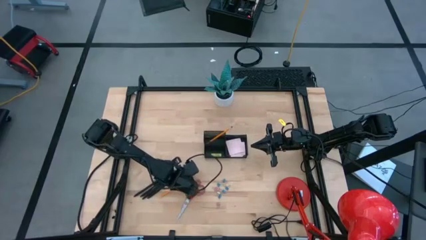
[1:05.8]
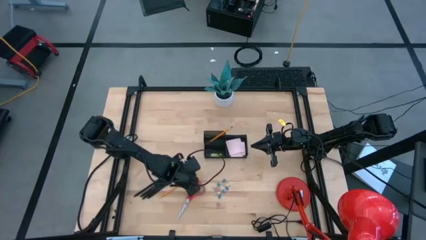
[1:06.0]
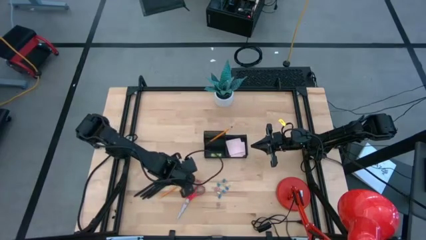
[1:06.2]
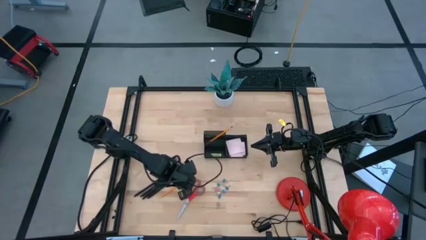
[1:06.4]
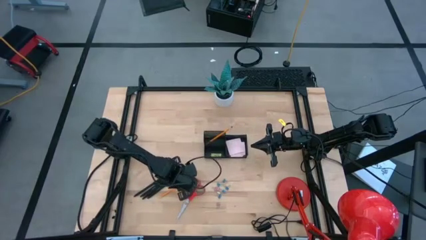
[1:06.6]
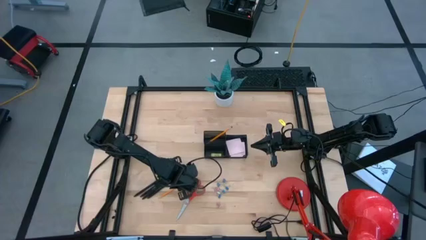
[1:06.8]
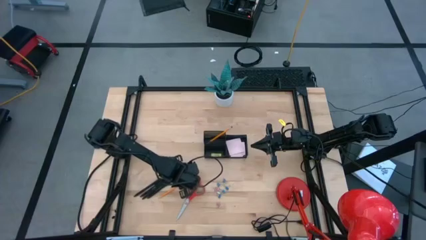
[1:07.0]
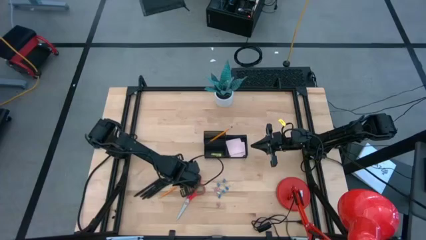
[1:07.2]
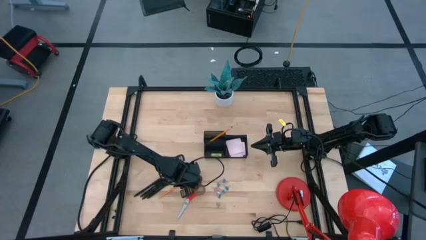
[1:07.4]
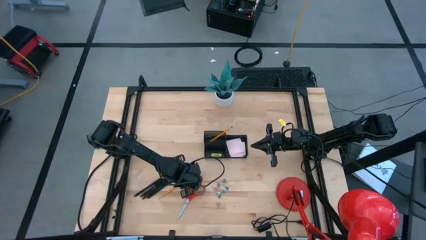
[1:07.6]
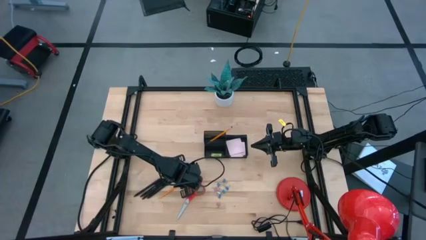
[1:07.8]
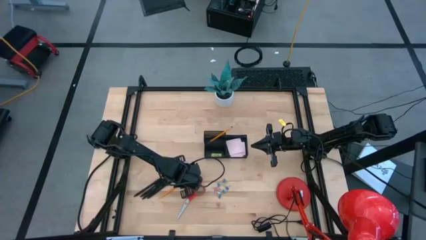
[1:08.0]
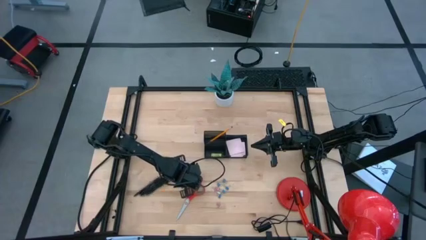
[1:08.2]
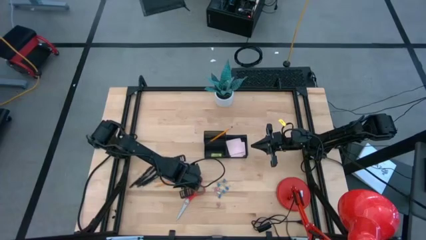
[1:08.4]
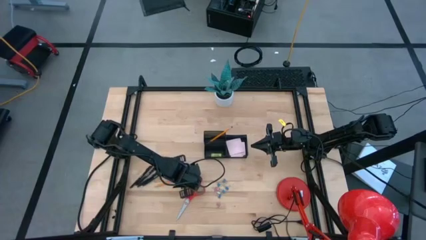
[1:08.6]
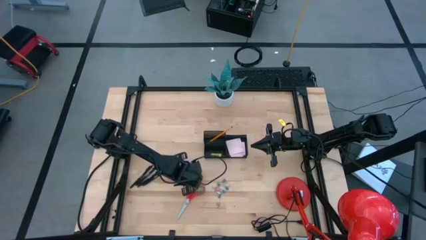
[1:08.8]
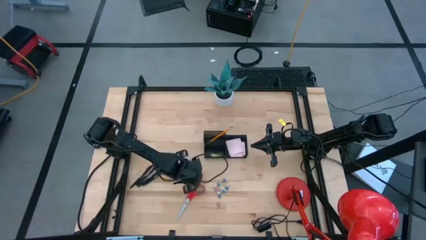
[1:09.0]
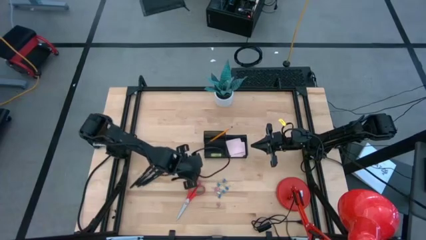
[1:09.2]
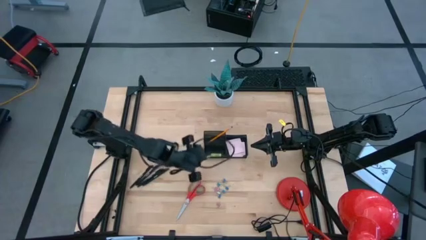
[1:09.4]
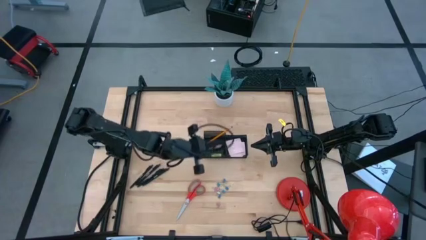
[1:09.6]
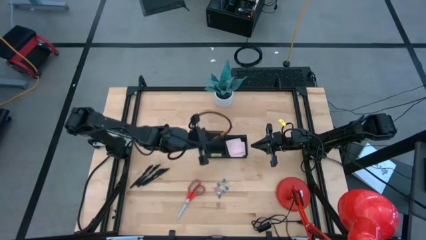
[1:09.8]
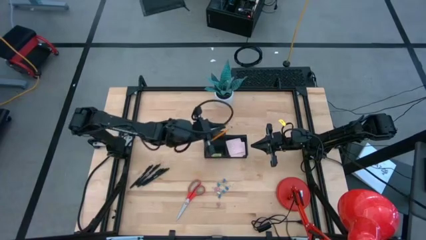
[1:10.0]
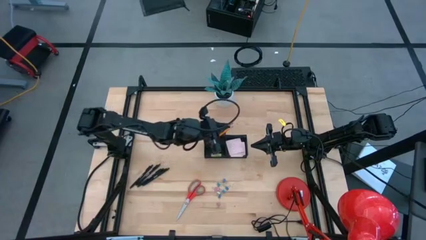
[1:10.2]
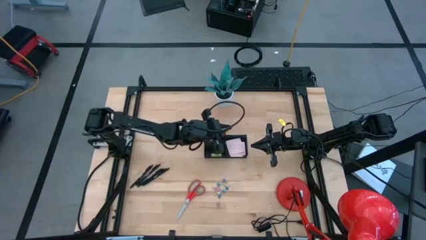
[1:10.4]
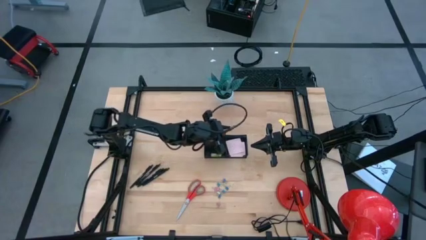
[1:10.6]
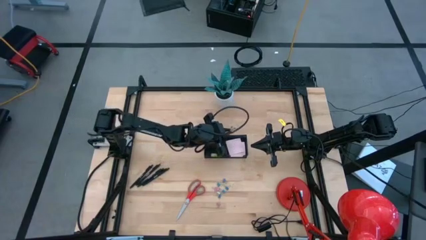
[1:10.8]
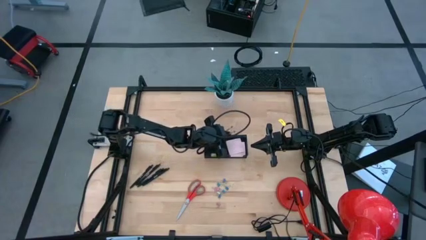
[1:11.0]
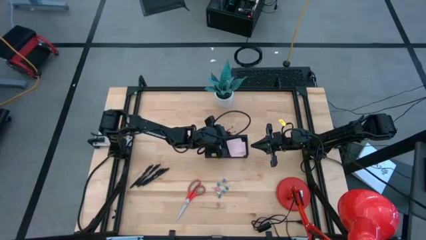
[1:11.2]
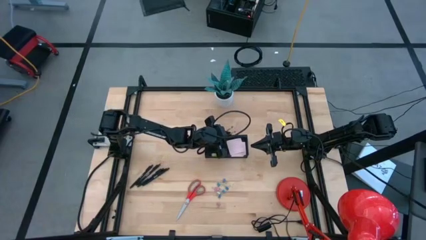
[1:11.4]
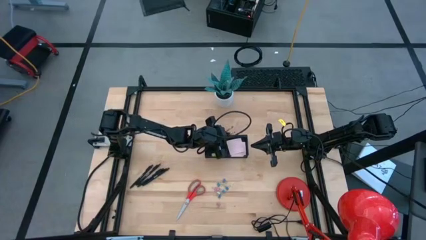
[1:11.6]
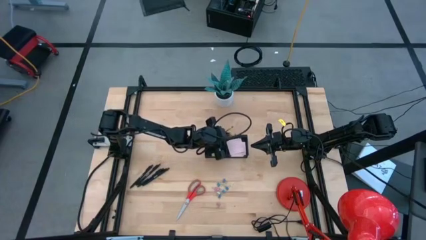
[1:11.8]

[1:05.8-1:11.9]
Task: Pick and place office supplies into organizer
Put the yellow pencil into the desk organizer

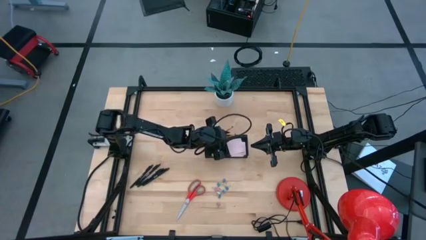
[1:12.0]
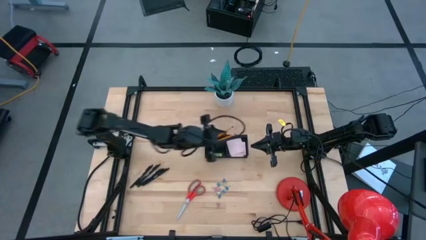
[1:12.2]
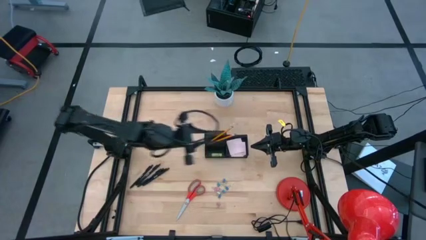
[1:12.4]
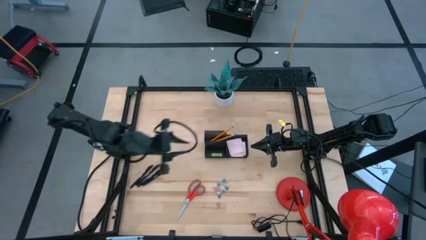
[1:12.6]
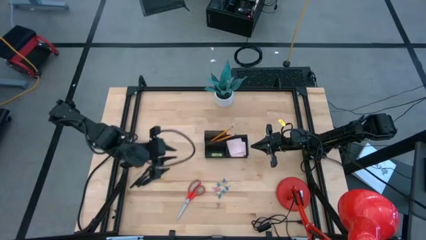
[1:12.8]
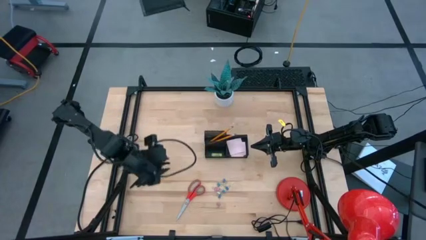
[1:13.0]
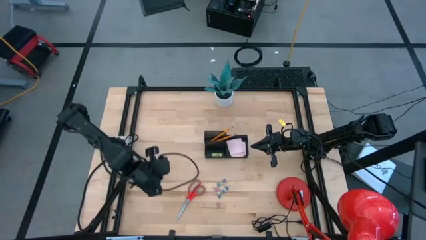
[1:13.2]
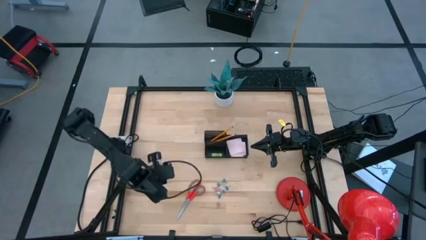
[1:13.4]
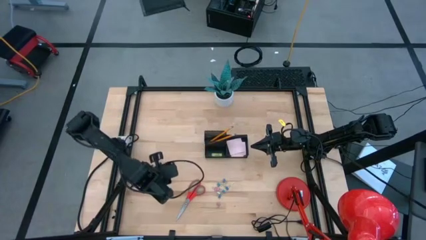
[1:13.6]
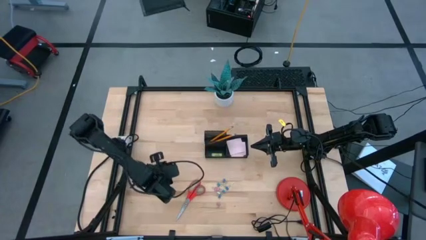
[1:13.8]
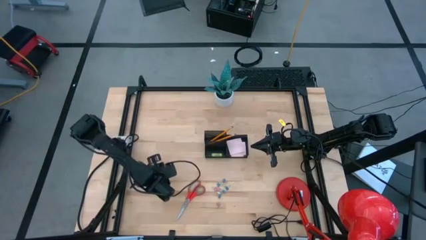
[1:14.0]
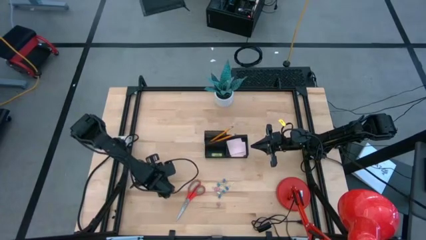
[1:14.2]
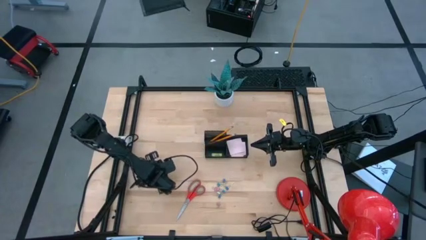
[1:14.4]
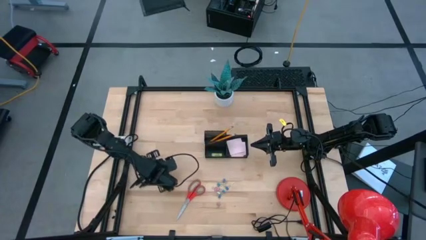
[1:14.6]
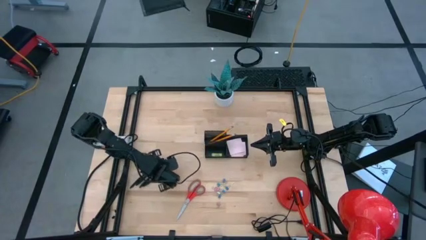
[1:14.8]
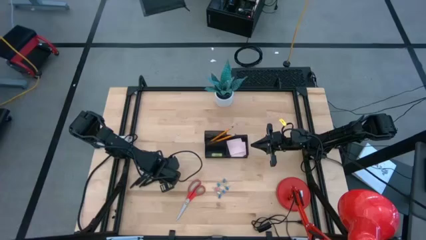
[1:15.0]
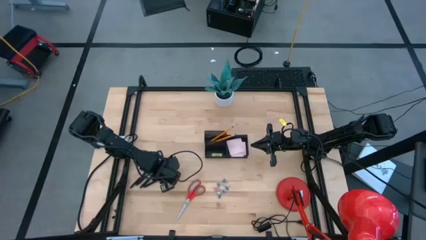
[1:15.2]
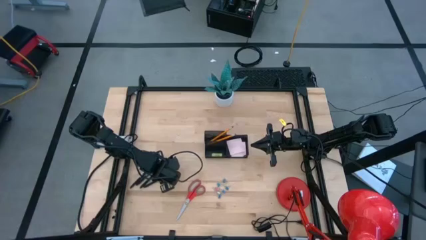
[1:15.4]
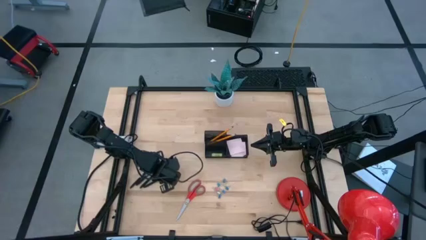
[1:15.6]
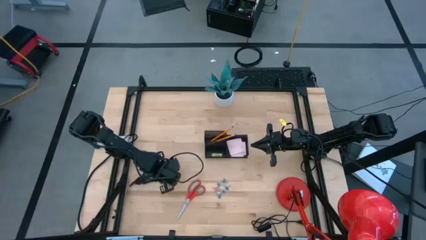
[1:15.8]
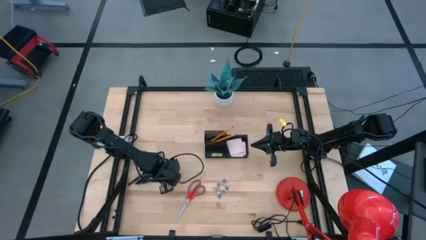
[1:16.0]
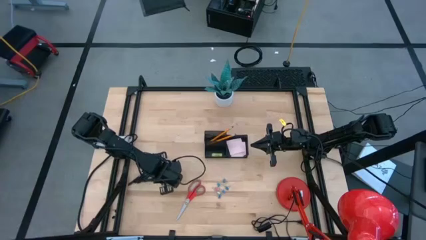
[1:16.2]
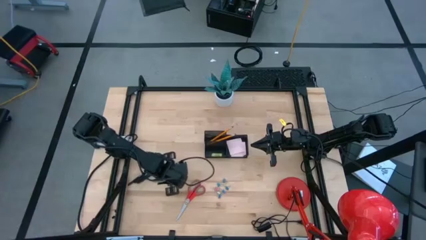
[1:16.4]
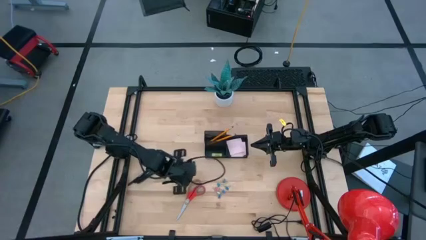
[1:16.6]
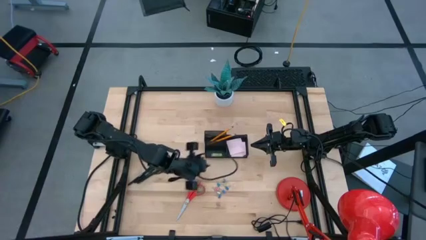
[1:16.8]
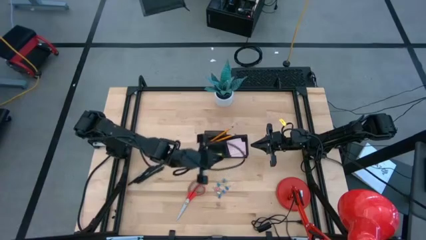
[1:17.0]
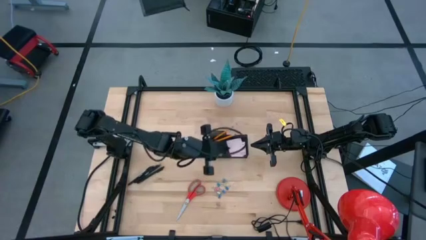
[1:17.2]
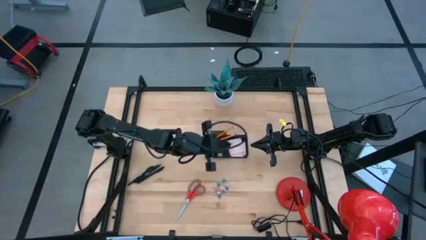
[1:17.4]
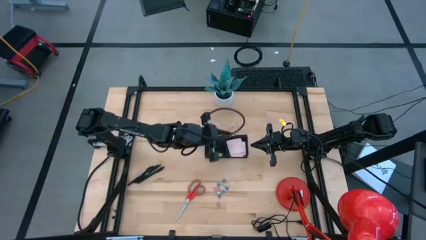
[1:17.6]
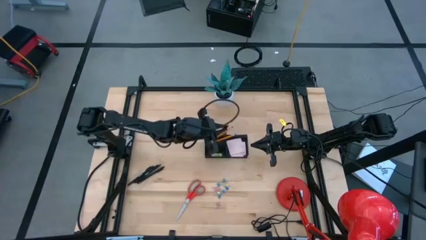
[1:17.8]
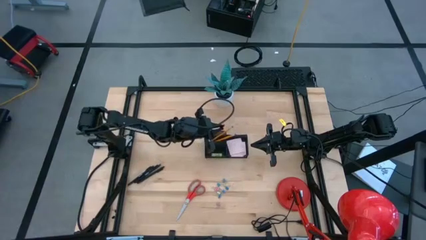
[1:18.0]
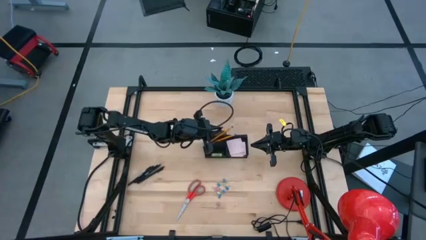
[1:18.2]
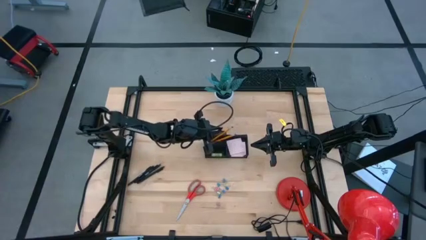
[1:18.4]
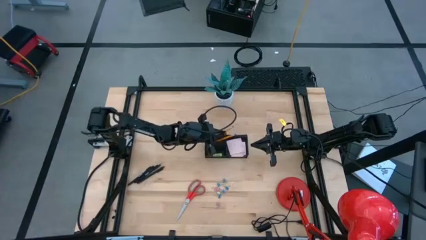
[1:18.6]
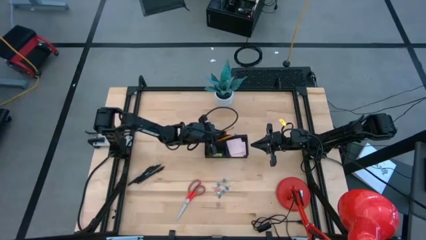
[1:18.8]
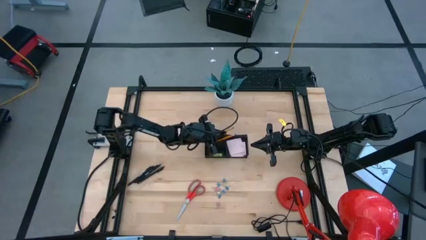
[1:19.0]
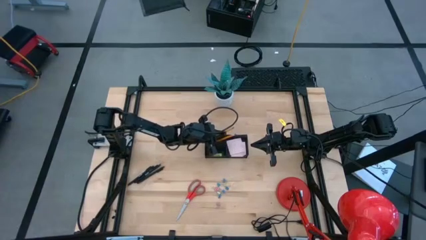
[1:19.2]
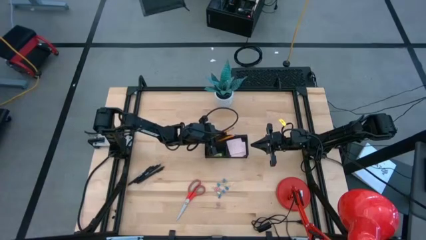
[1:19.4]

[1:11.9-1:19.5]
Put the black pen into the desk organizer

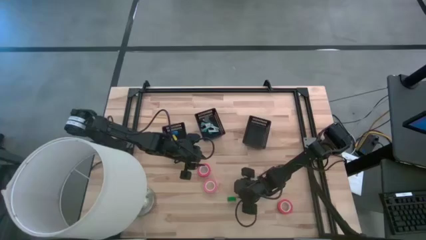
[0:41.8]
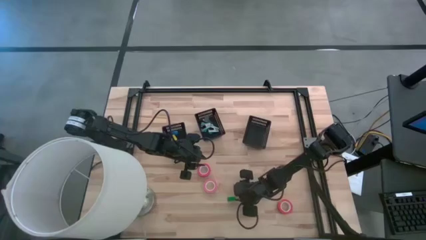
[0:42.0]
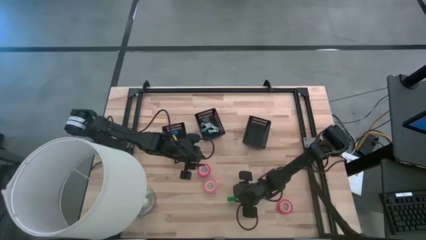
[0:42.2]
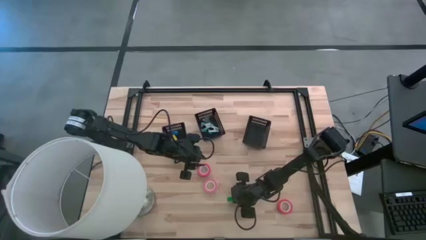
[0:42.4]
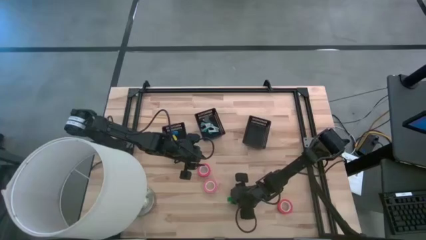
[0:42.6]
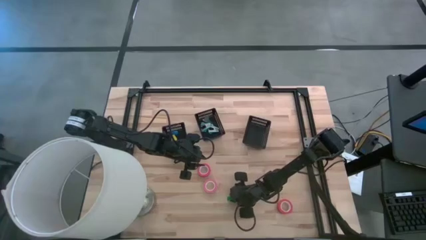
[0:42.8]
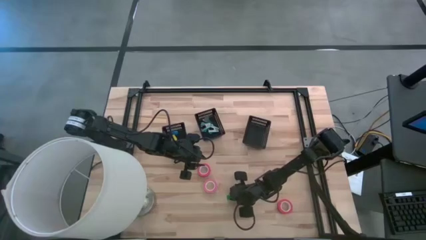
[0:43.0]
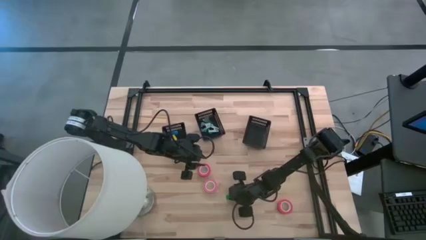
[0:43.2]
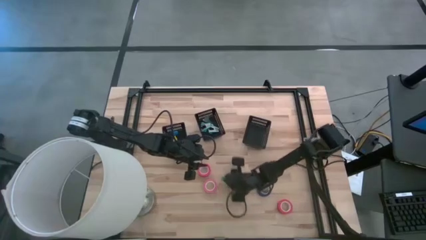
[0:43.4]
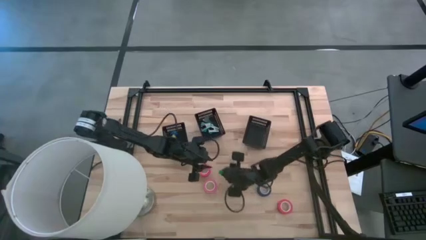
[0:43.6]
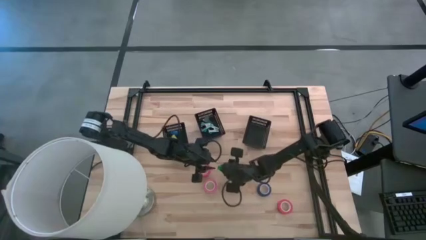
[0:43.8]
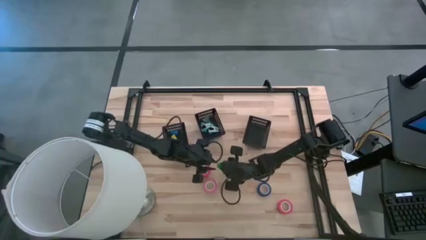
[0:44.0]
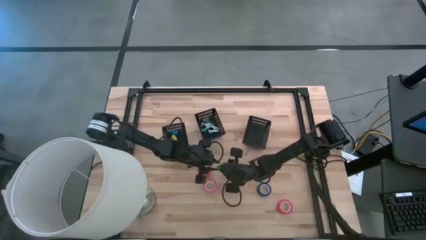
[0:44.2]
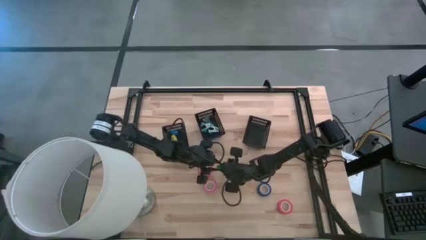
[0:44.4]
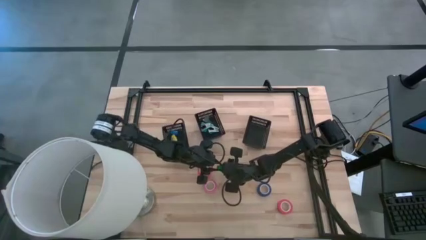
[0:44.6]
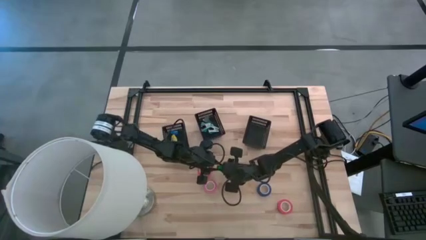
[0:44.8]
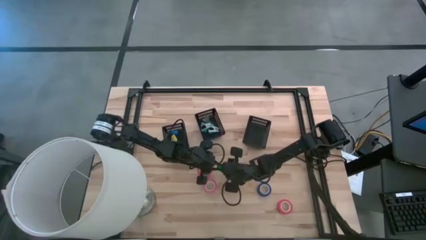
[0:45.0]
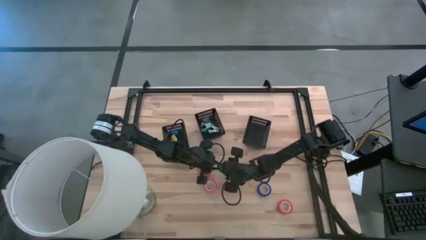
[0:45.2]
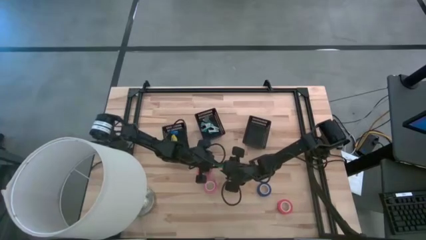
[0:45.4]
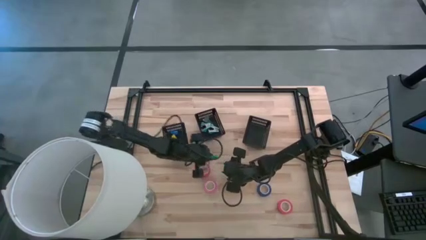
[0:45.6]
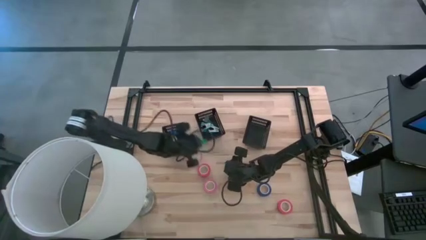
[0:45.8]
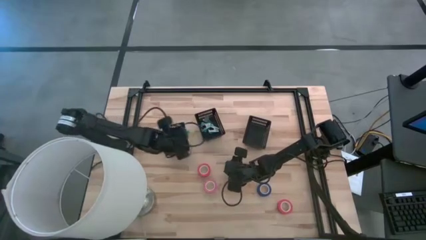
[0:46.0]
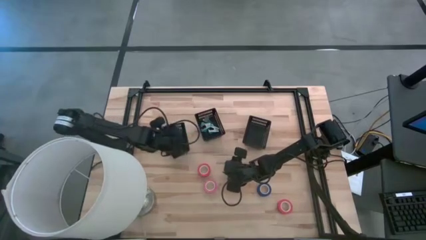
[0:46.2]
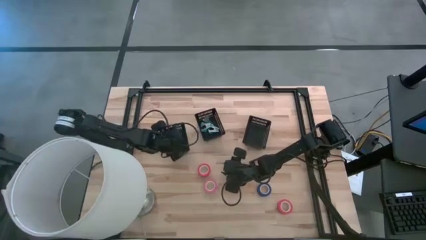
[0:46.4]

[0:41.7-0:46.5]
Task: Pick and place Stapler, Stapler remover, tape
Put the green stapler into the left black bin
